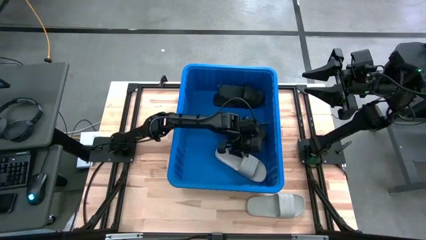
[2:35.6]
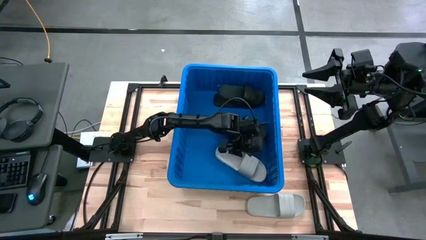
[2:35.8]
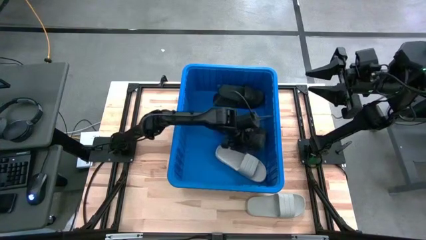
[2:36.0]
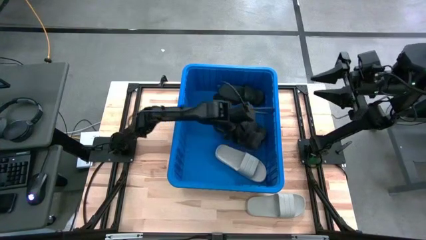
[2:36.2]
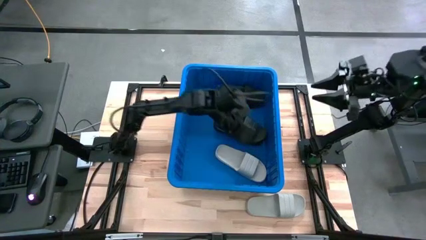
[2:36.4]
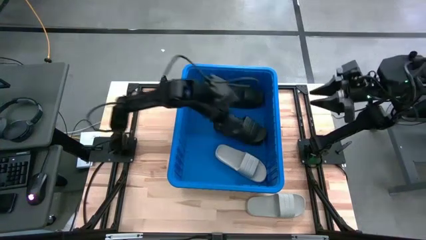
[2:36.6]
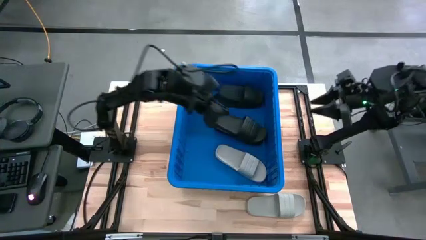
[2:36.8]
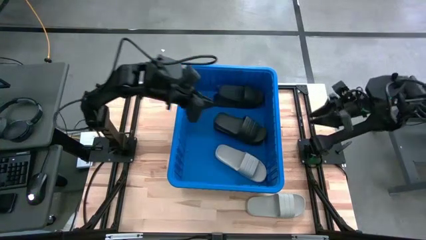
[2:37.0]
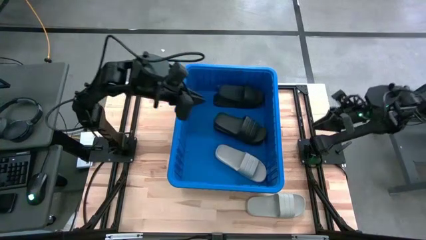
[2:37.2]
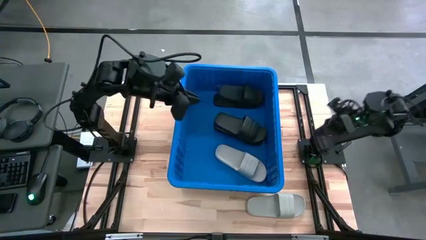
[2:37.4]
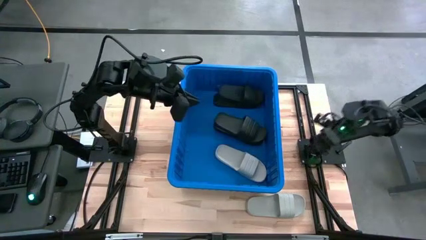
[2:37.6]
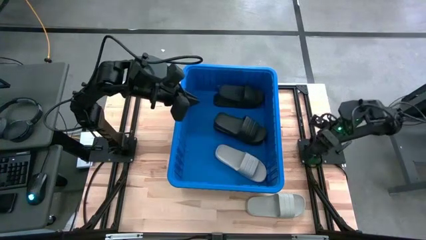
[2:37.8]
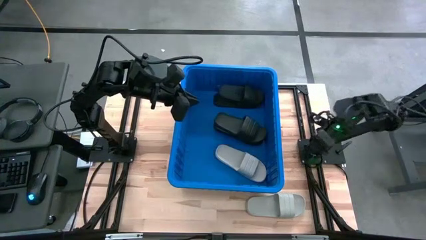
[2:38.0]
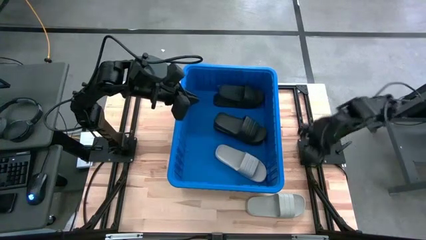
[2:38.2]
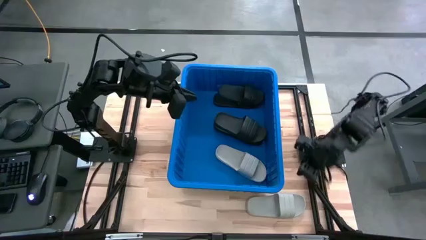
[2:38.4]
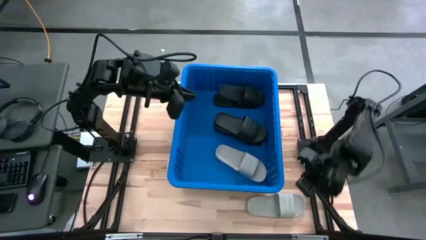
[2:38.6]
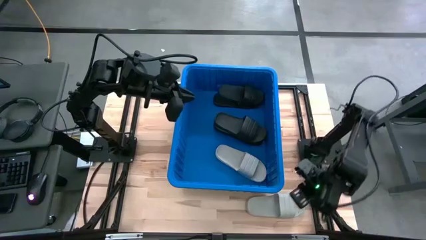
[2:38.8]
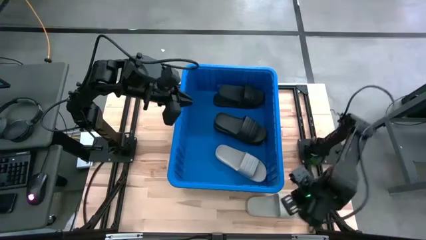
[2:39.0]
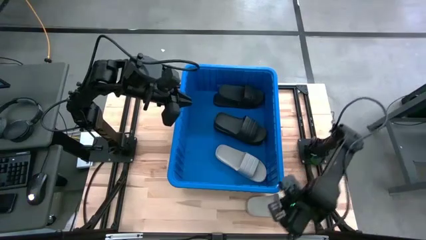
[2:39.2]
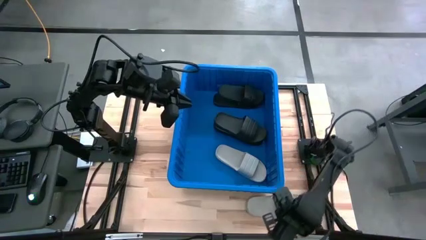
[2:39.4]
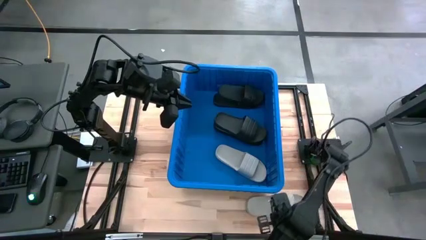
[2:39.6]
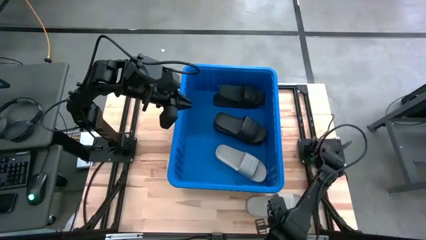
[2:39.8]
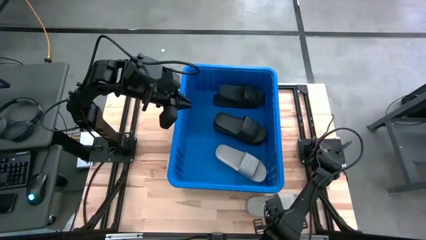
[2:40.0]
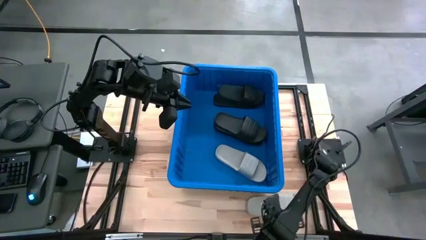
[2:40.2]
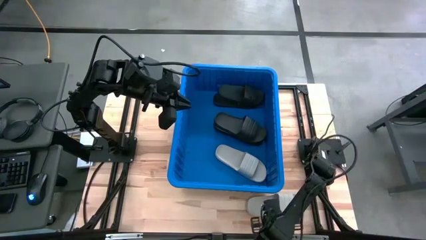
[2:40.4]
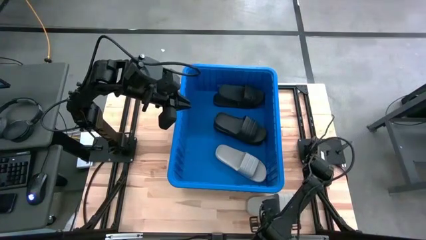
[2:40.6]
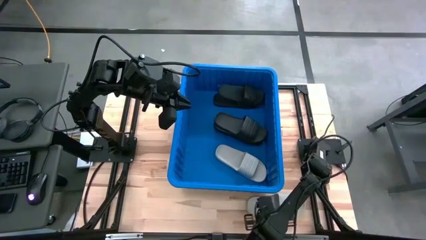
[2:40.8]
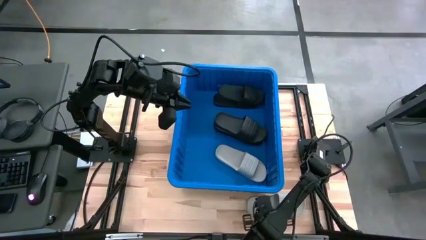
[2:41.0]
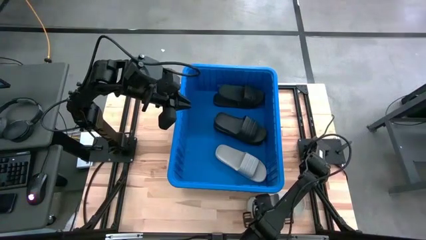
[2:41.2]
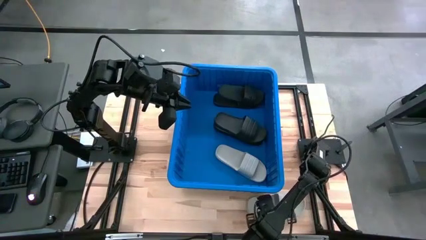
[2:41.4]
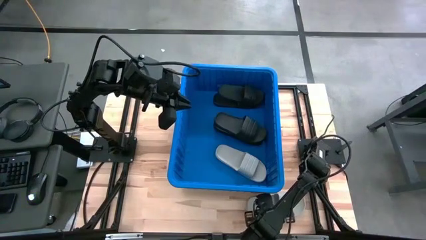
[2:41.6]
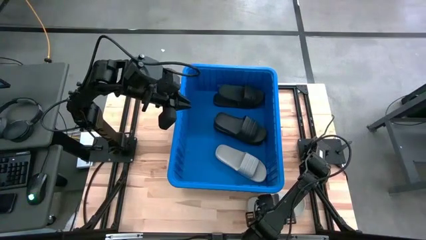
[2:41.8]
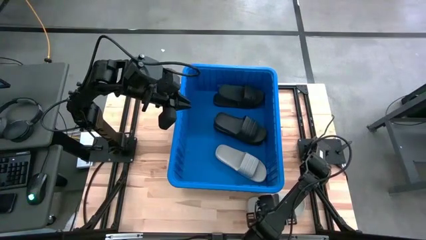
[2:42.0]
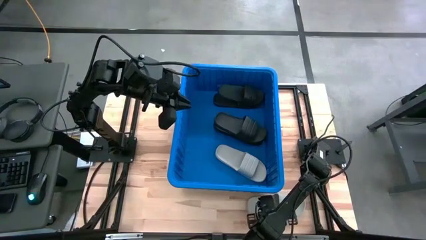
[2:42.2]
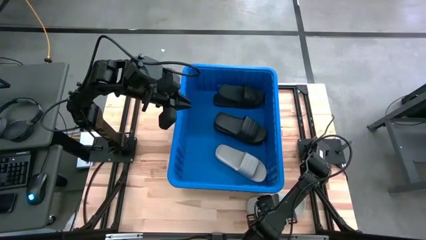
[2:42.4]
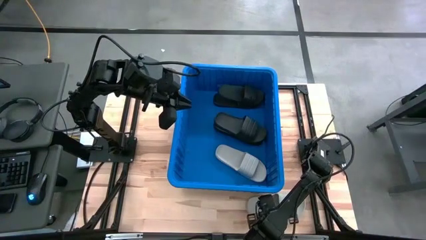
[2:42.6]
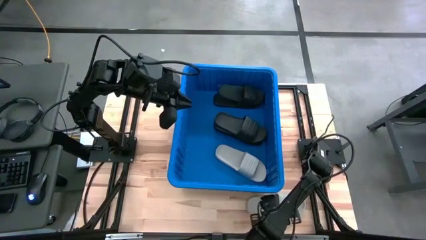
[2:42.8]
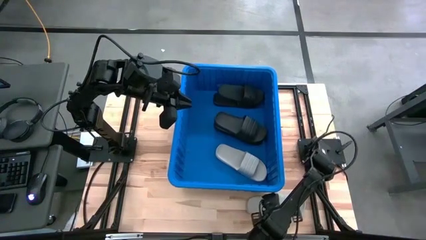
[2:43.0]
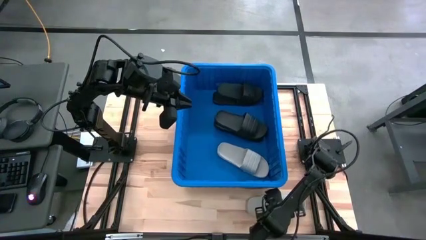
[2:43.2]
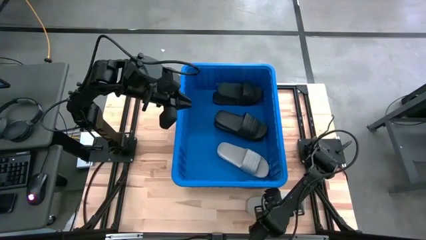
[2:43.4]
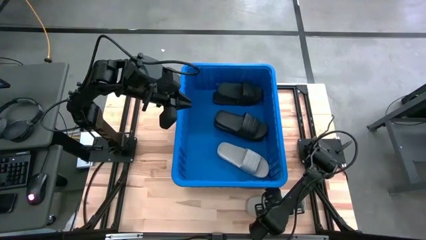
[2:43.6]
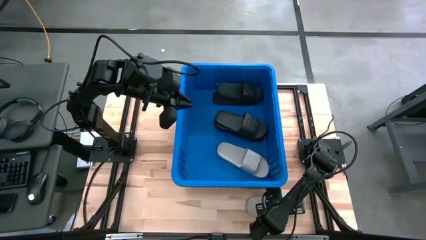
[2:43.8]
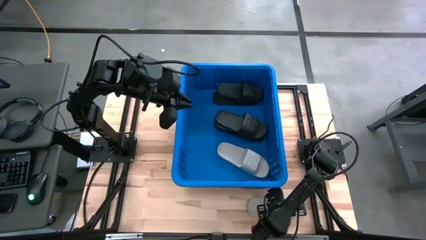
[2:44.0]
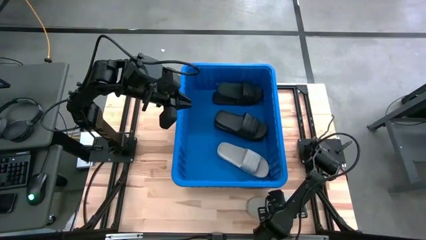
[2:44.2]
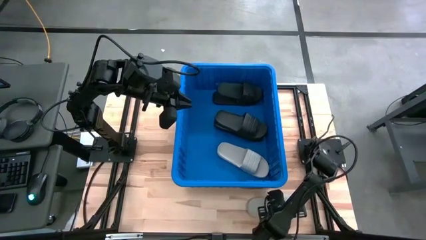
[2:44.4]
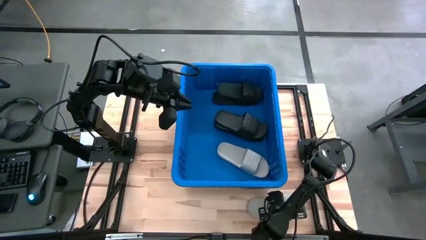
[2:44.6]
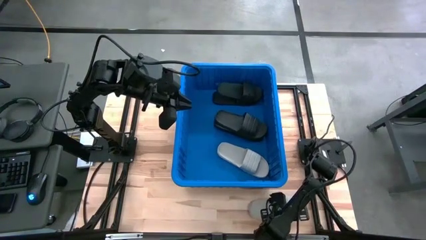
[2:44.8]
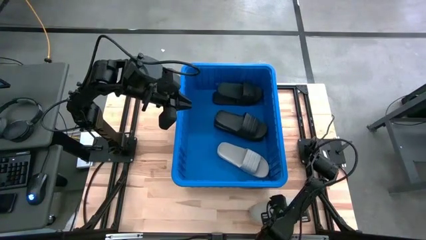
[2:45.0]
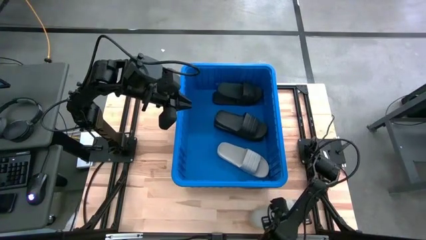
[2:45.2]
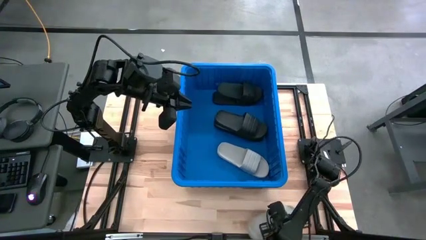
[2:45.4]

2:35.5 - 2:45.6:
Task: Pick and place slides into bin
Stack the gray slipper on the gray slipper in the blue bin

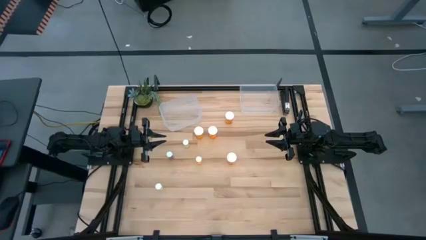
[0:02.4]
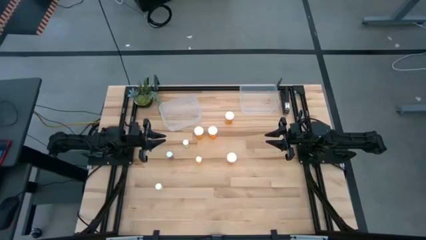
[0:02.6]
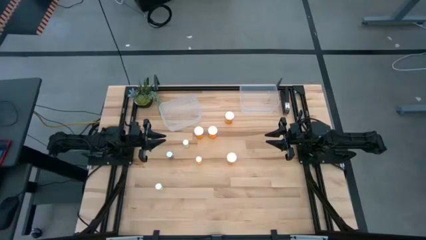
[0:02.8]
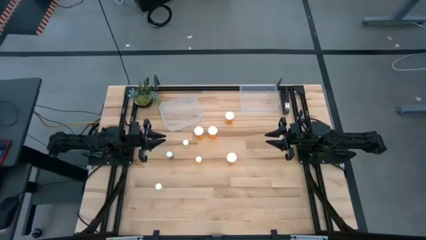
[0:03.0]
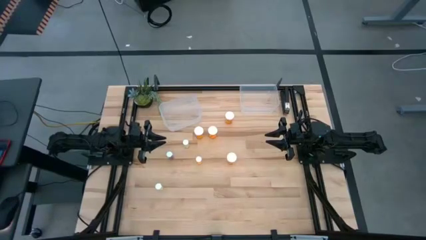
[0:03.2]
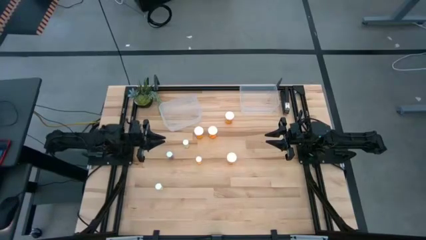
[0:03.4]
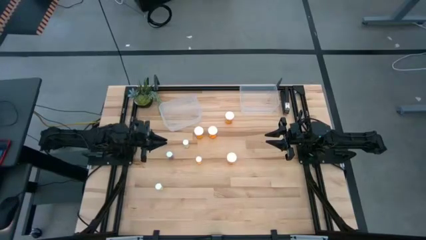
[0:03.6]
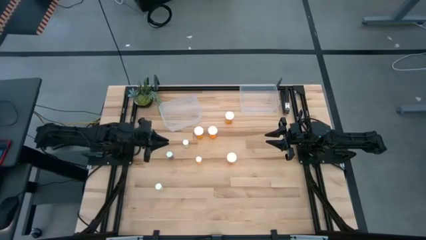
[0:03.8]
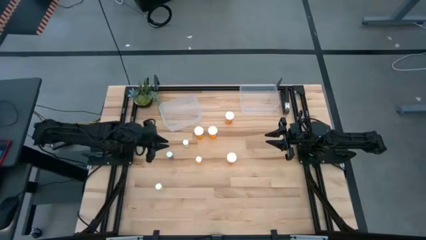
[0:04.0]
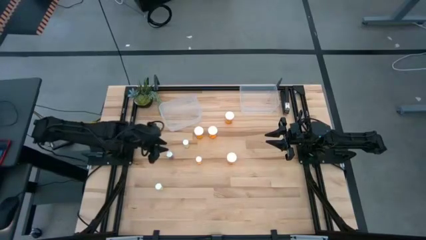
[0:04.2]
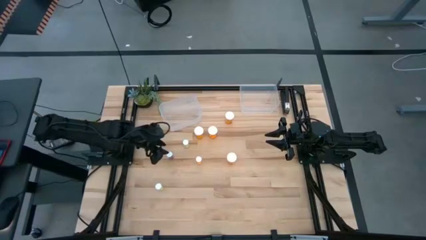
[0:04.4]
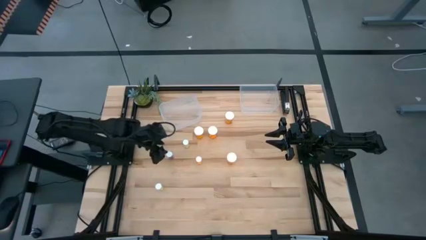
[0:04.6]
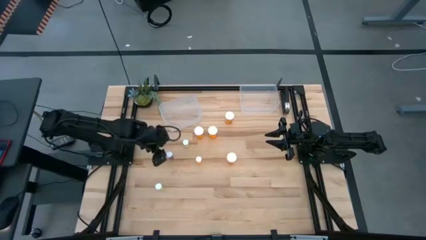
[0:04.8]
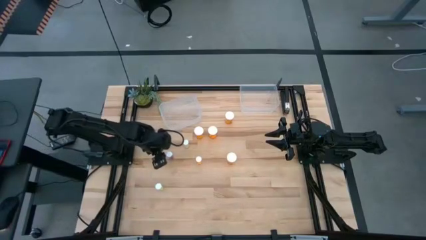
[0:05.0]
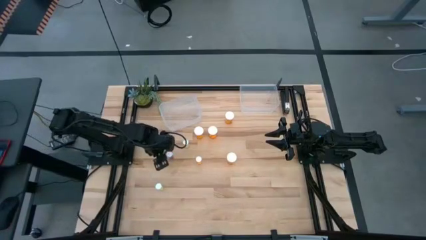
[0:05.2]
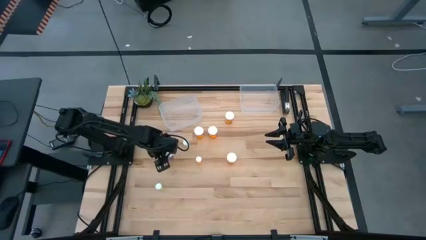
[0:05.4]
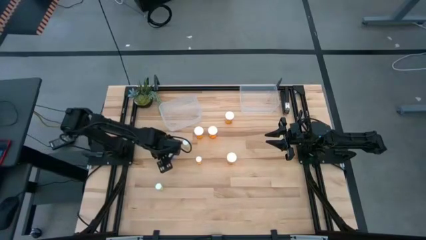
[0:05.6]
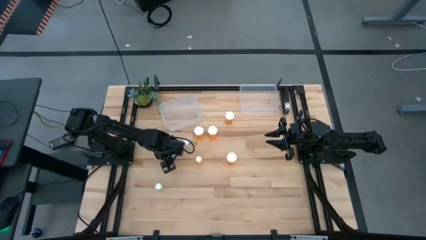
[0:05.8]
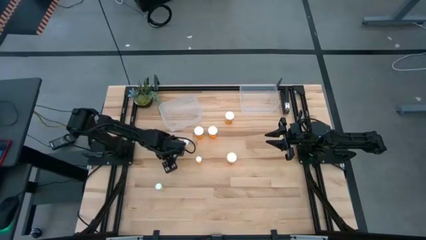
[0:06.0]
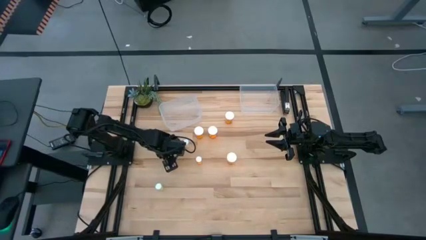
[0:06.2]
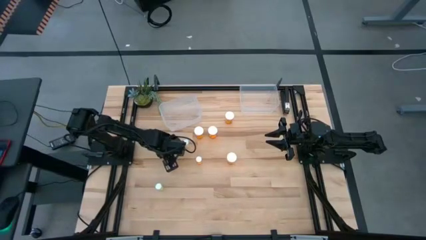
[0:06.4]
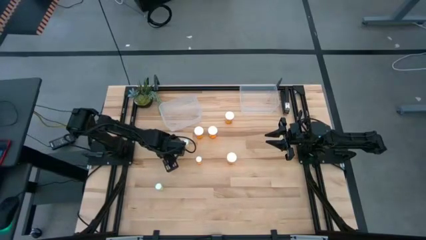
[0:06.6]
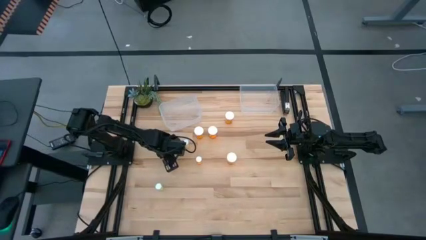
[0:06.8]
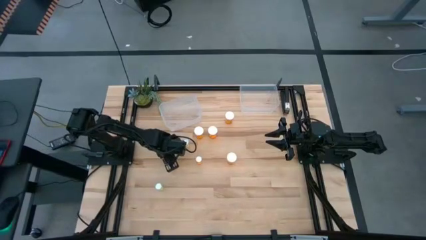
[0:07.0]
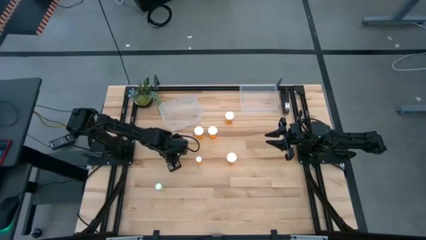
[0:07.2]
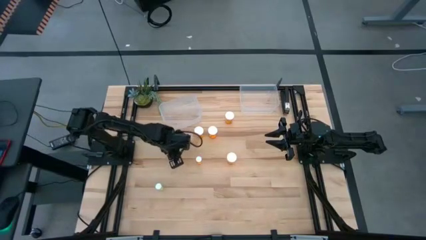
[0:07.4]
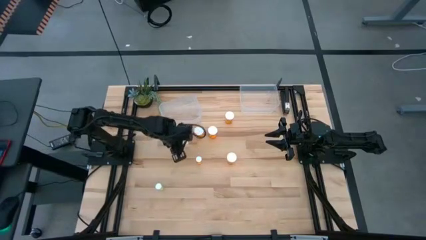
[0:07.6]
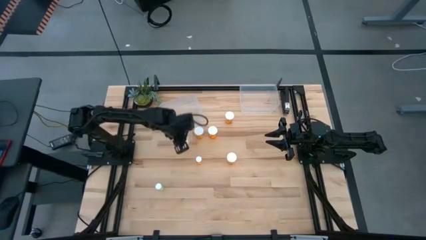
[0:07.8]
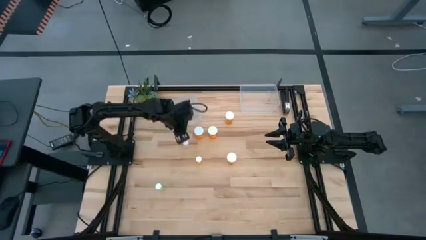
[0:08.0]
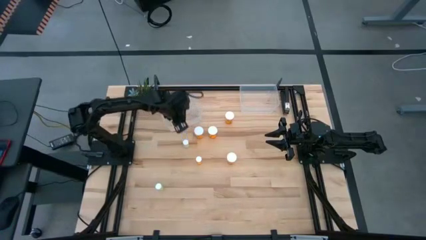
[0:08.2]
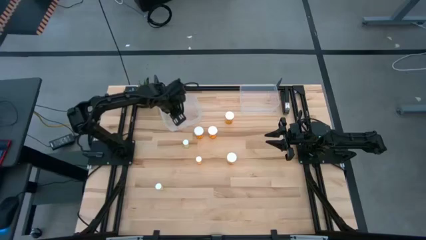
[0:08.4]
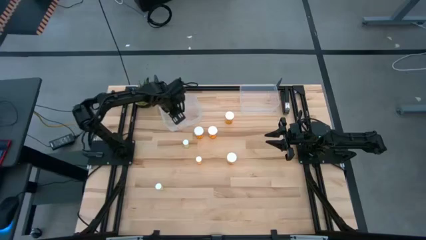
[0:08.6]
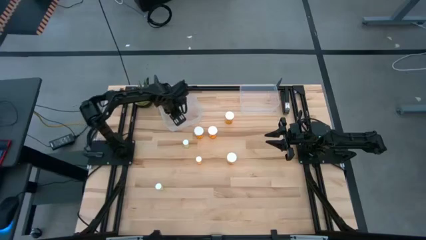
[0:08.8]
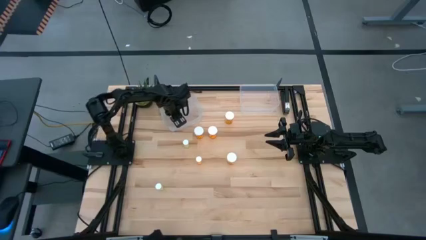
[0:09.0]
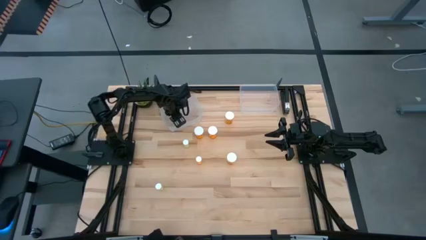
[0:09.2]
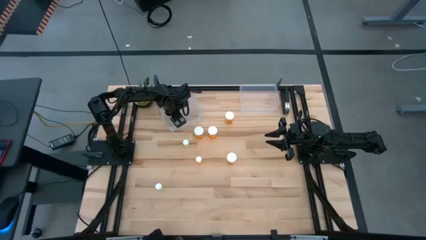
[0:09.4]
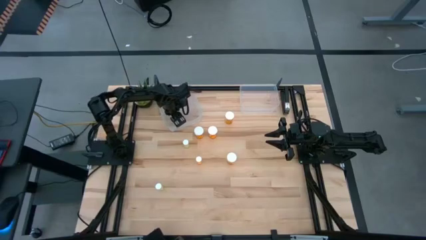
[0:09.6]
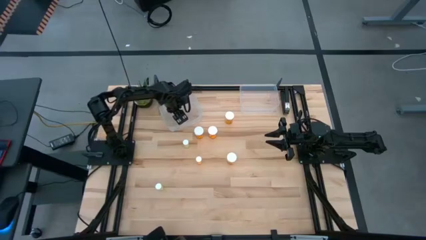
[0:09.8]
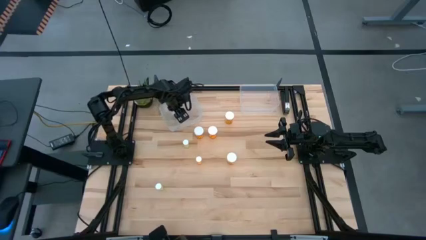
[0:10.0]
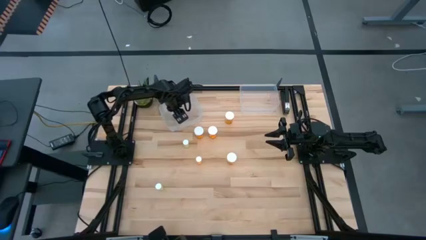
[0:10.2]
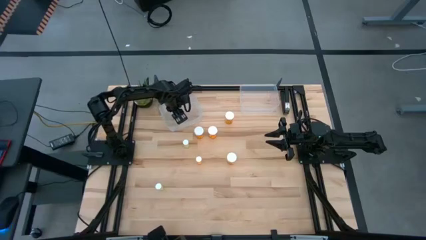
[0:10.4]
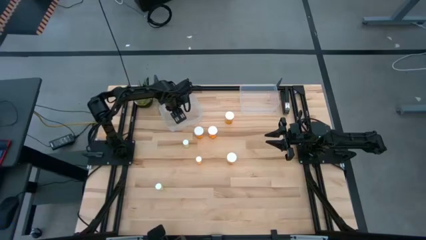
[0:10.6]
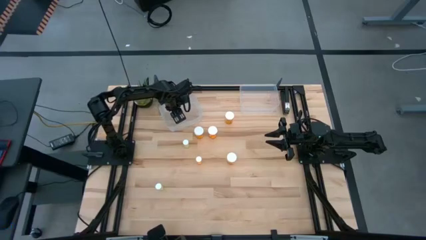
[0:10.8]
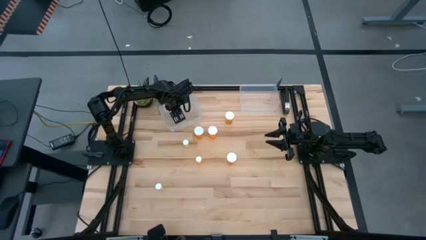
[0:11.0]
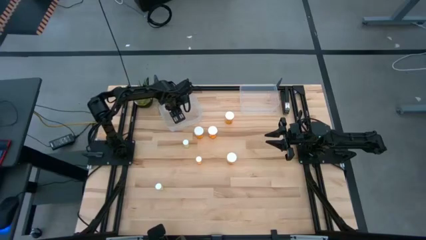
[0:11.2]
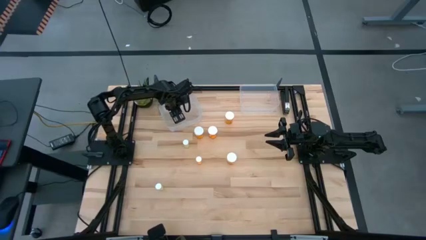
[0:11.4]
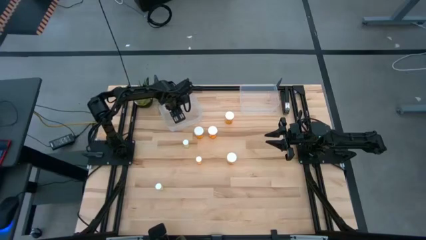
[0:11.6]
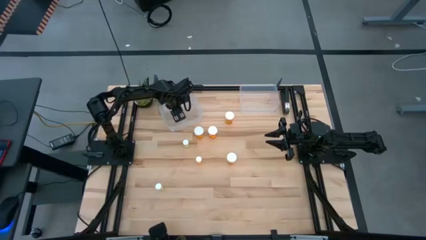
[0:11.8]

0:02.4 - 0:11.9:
Task: Pick and place medicine bottles into bin by pill shape (circle, oval)
Put the blue small pill bottle into the left transparent bin
